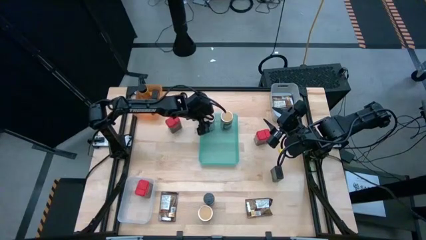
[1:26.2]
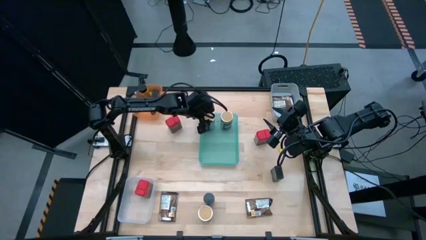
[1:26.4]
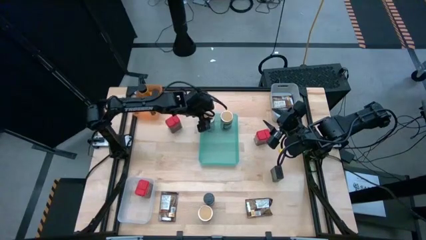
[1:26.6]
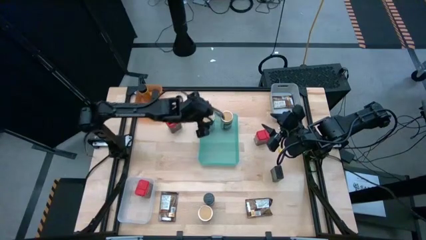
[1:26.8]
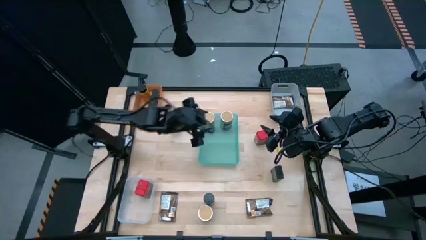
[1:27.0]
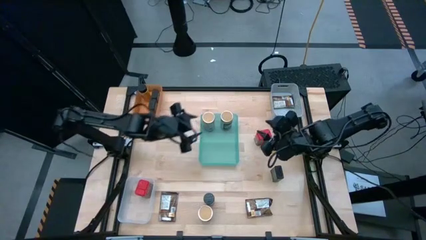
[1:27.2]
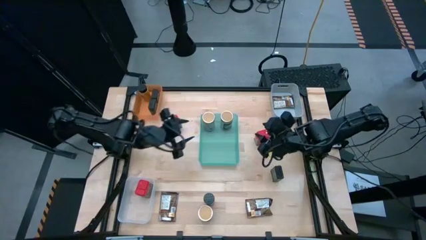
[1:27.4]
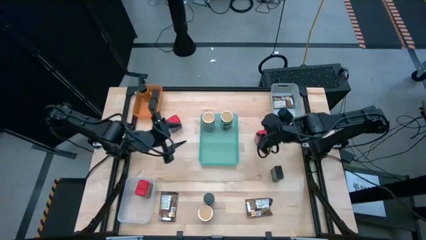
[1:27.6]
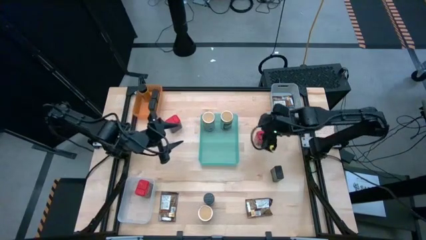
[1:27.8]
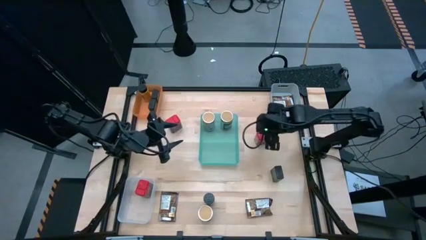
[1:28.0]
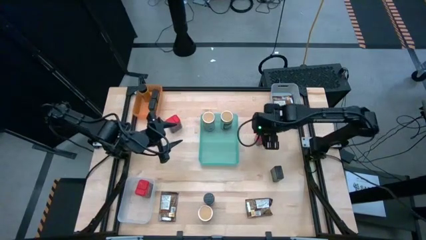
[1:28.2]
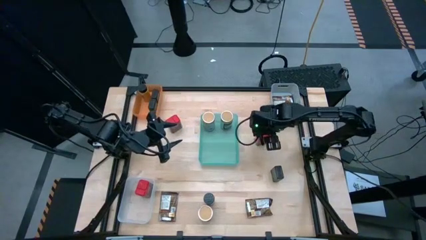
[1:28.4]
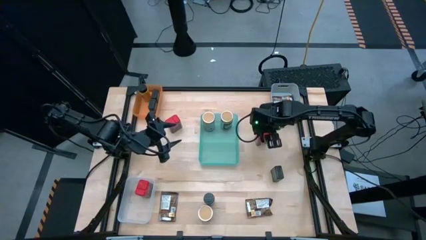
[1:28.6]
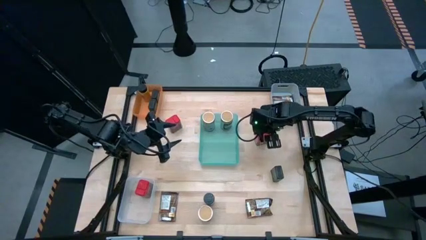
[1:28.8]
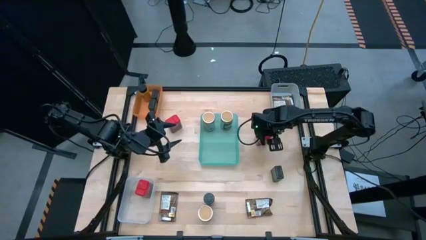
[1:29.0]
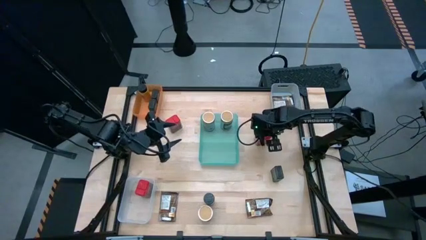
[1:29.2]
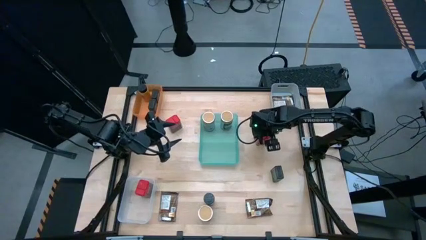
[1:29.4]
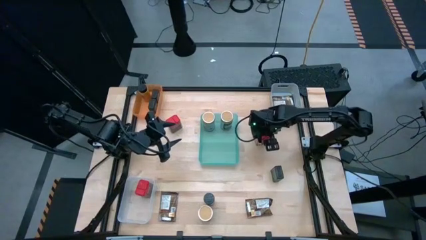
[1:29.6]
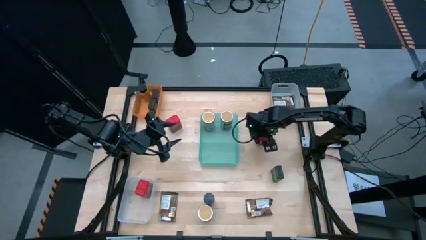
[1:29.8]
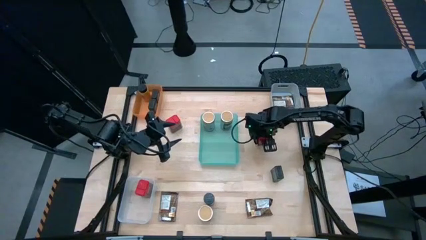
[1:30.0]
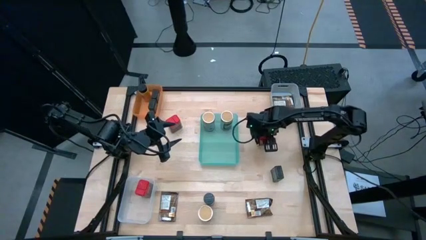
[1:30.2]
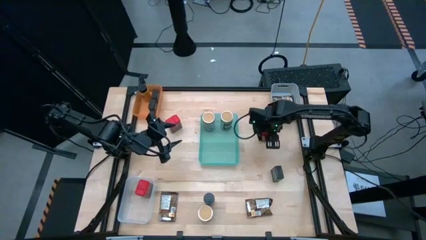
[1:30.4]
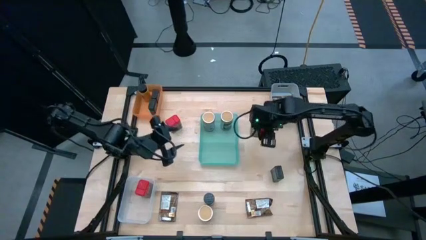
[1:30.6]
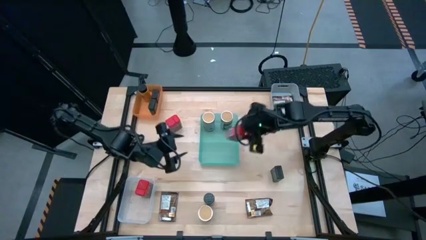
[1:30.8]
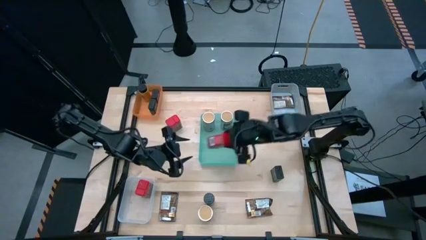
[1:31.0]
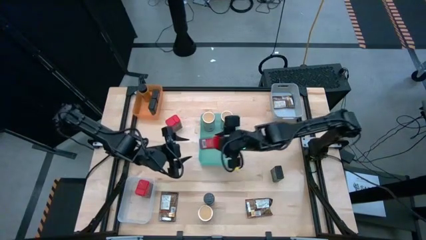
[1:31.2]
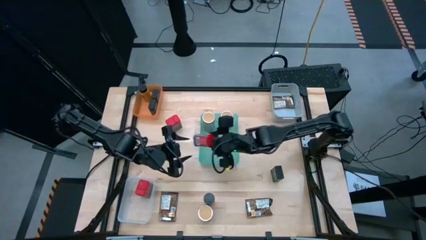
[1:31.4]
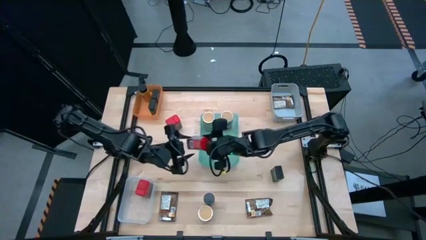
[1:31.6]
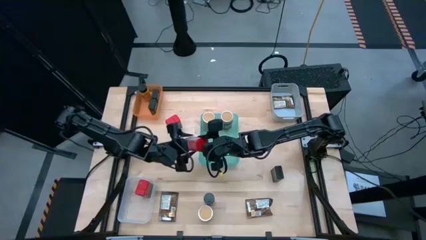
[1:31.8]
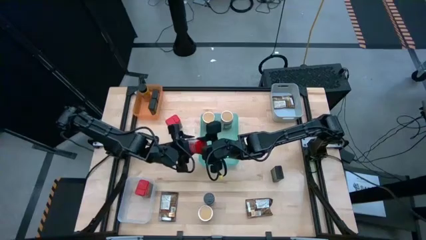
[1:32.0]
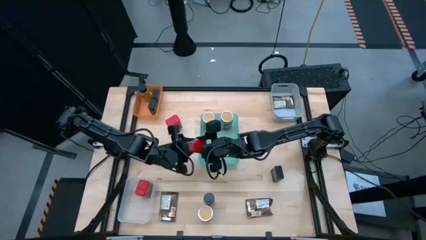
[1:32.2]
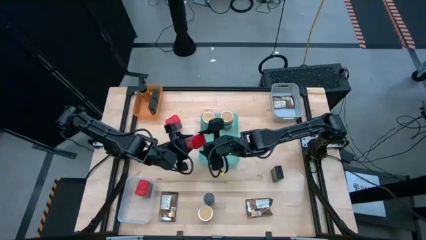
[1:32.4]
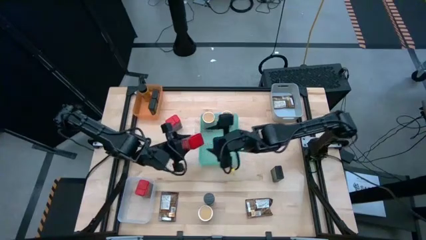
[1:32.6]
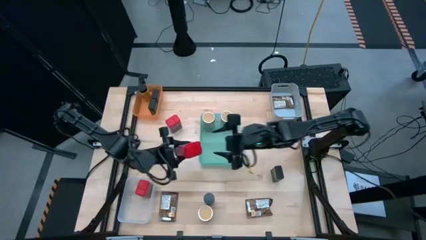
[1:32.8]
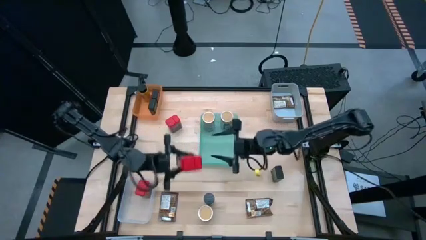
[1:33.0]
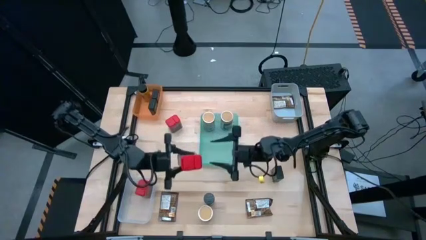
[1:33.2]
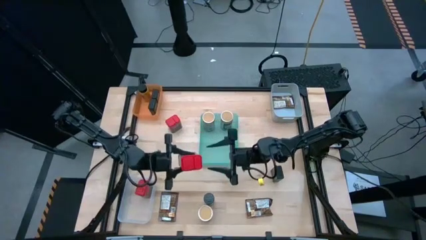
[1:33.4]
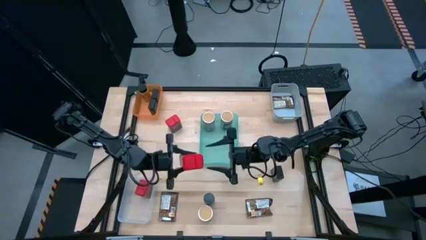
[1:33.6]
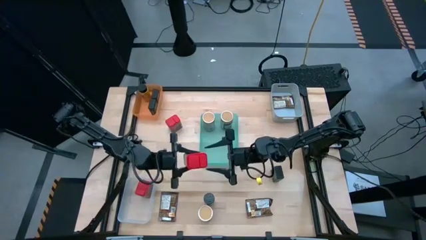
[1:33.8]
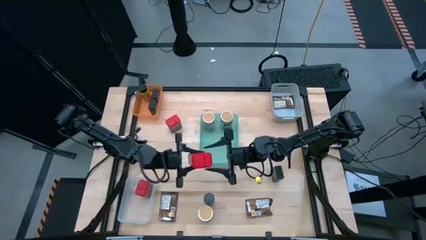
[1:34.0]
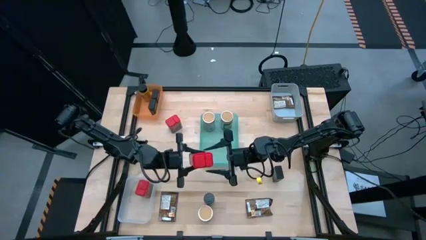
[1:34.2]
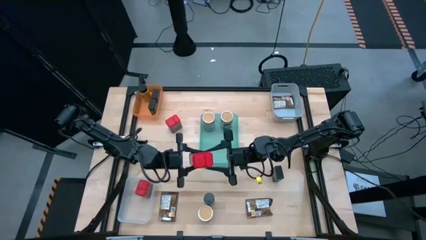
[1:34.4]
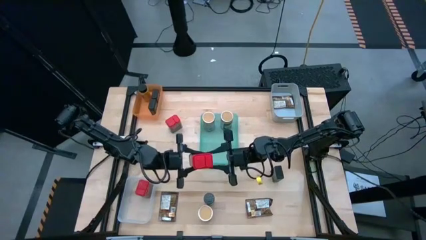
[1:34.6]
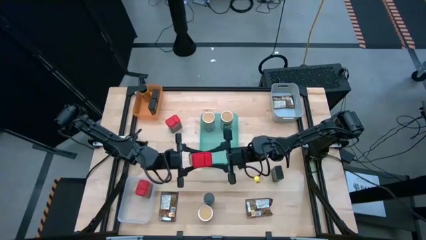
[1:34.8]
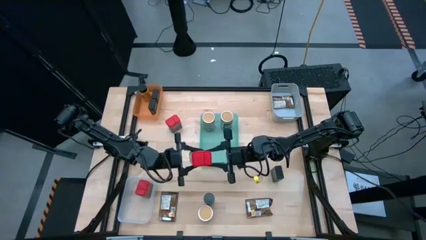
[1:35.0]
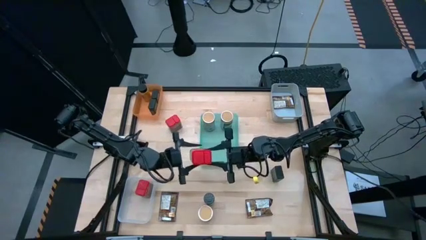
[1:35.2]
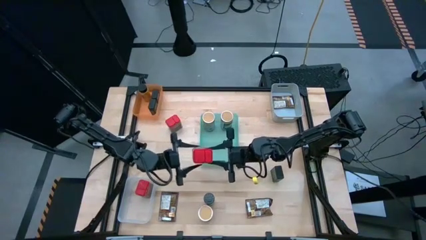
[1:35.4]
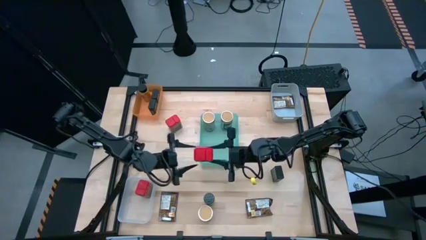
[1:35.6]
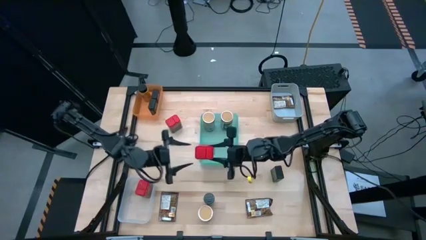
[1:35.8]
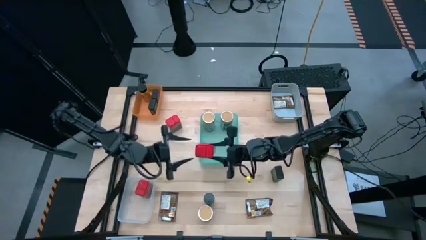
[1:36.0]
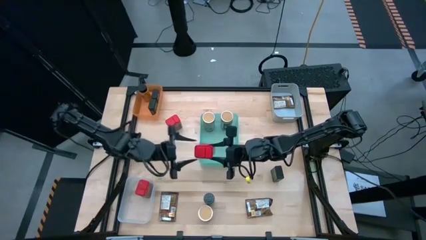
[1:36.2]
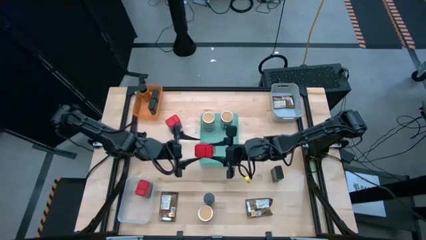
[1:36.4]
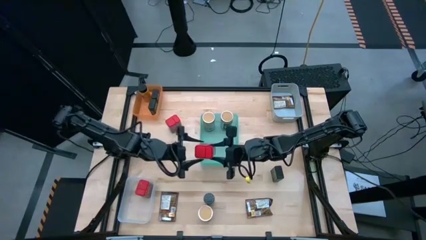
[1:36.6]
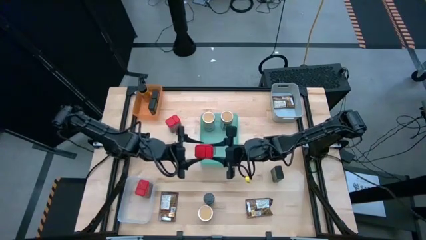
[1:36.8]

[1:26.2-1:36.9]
Task: Sort spices by type
Put the right red seasoning can into the transparent bin
